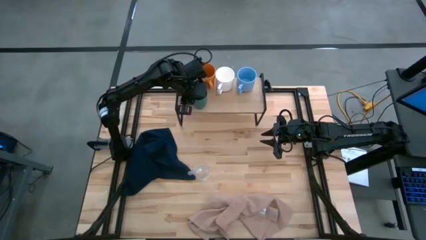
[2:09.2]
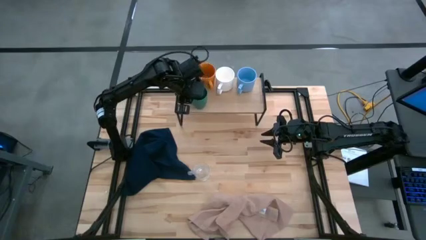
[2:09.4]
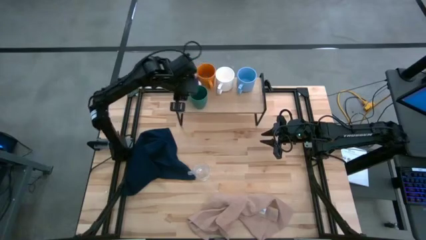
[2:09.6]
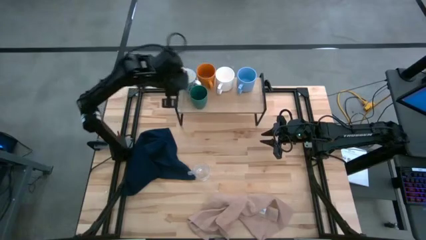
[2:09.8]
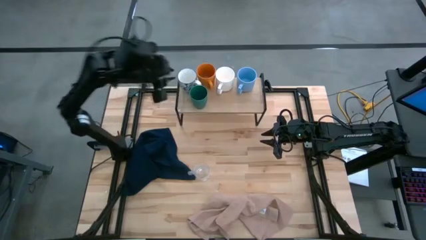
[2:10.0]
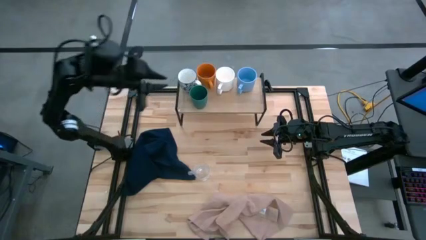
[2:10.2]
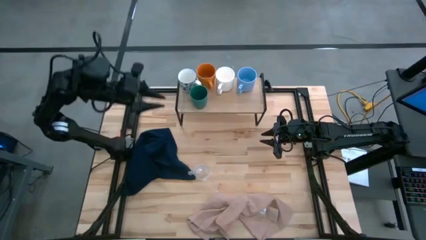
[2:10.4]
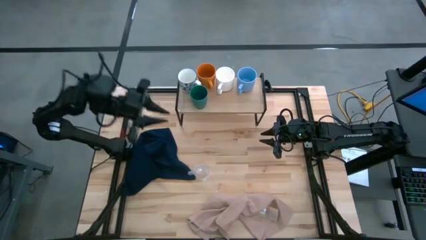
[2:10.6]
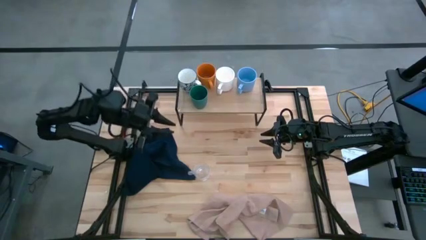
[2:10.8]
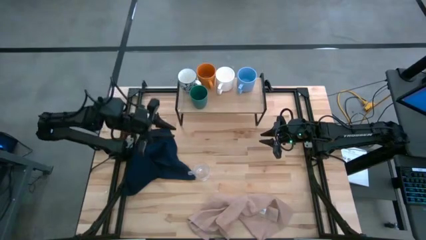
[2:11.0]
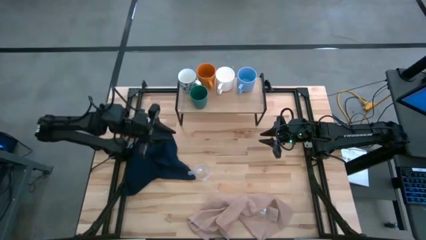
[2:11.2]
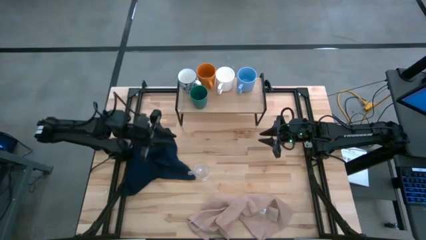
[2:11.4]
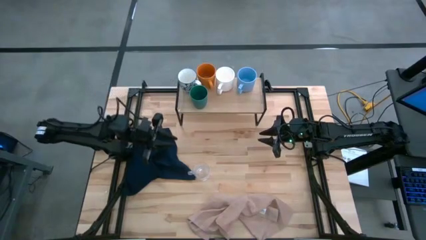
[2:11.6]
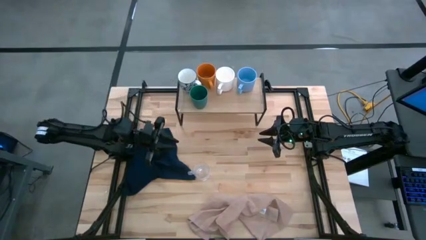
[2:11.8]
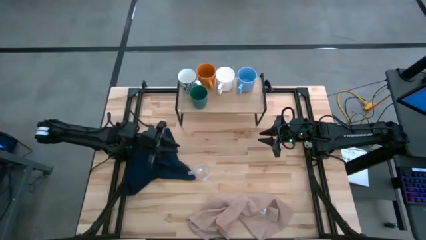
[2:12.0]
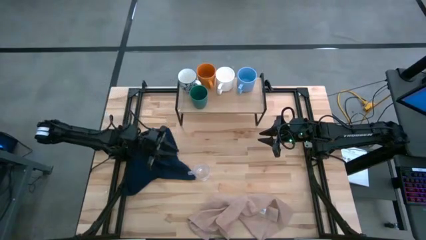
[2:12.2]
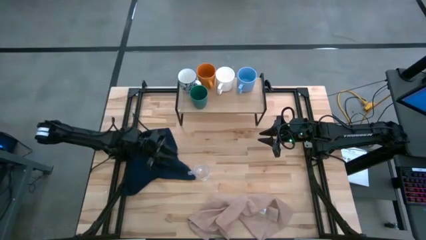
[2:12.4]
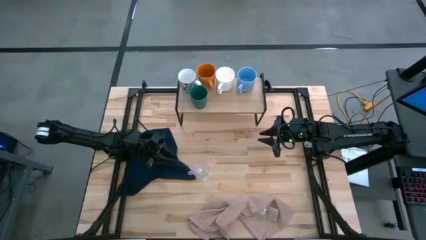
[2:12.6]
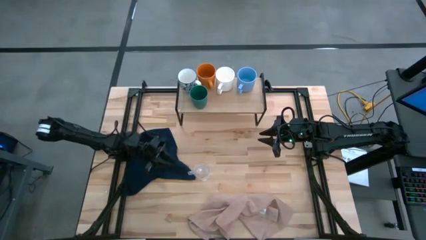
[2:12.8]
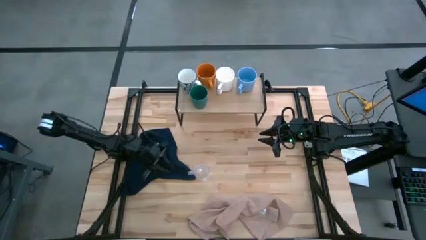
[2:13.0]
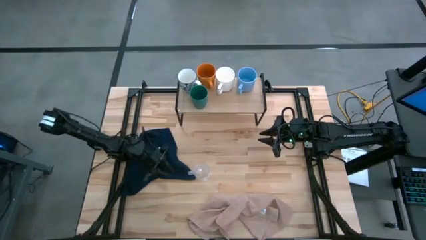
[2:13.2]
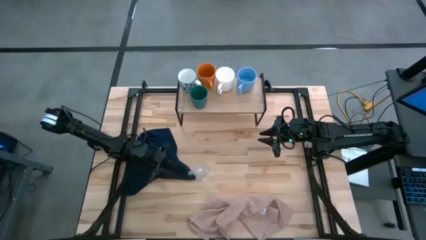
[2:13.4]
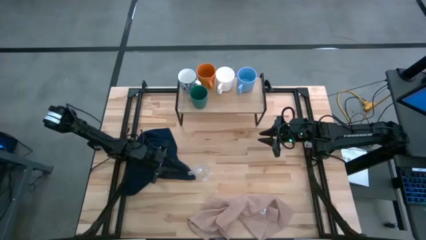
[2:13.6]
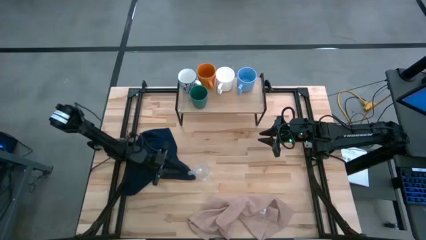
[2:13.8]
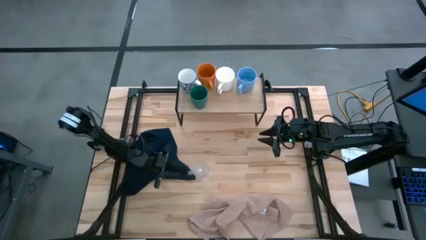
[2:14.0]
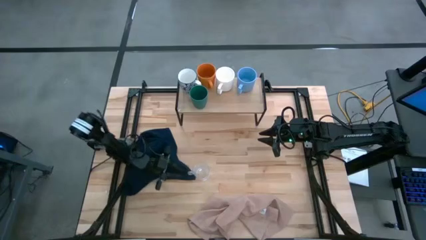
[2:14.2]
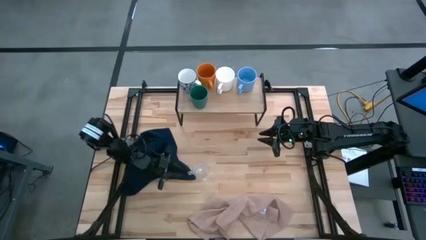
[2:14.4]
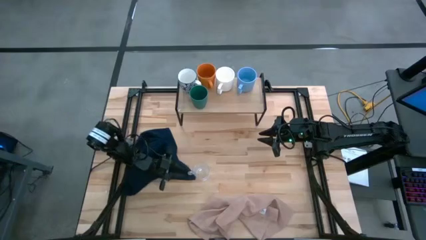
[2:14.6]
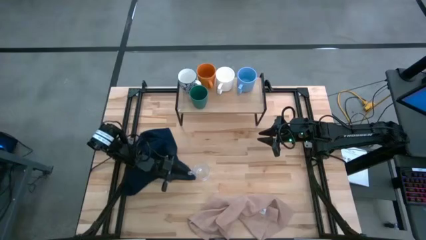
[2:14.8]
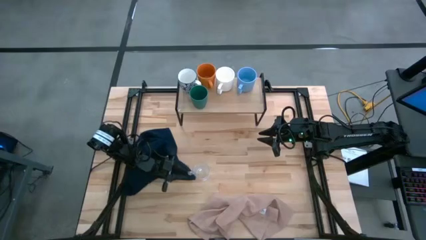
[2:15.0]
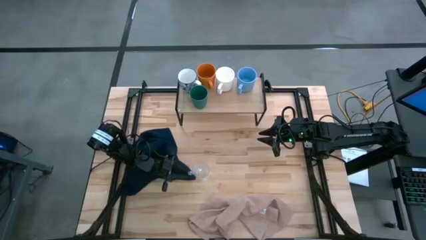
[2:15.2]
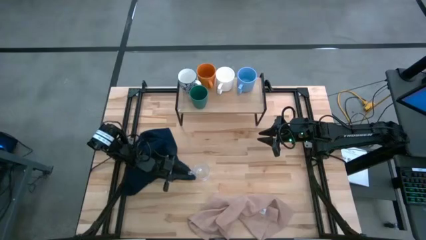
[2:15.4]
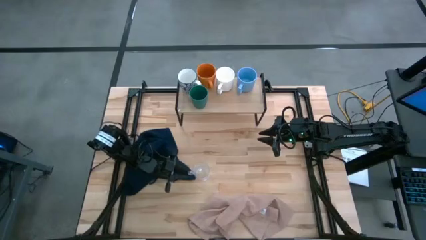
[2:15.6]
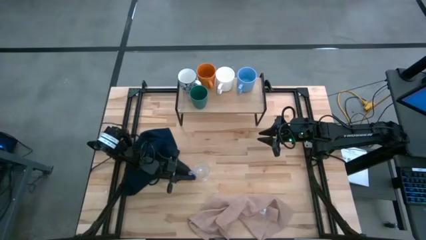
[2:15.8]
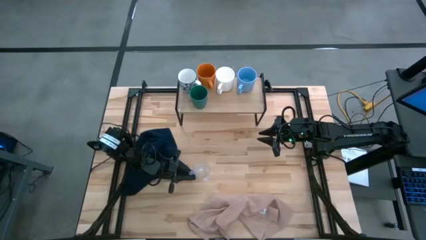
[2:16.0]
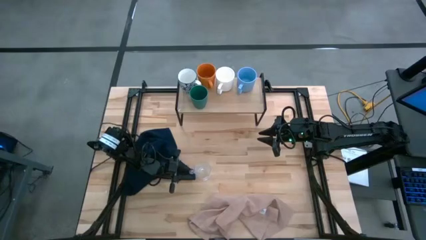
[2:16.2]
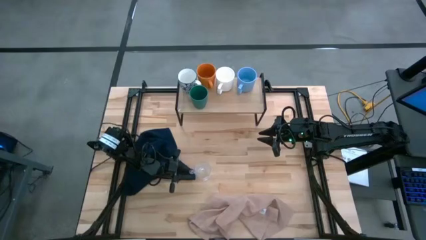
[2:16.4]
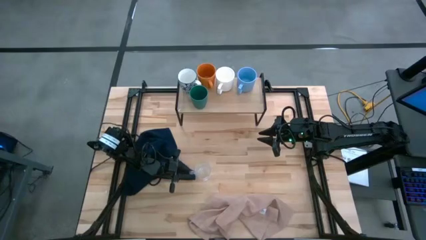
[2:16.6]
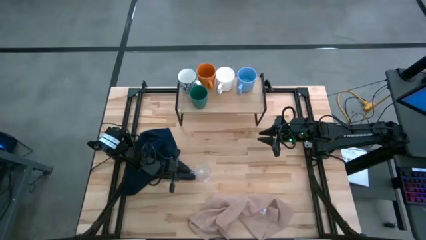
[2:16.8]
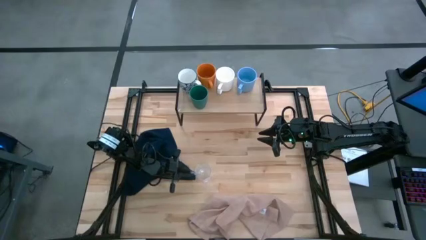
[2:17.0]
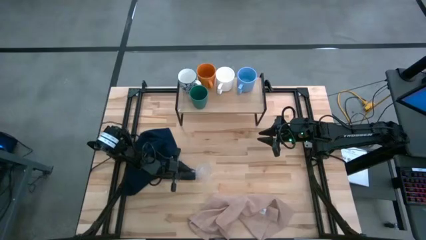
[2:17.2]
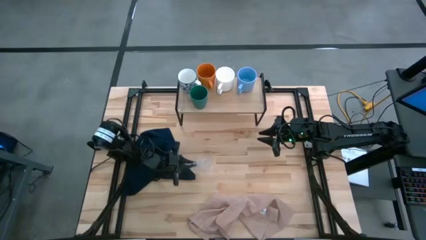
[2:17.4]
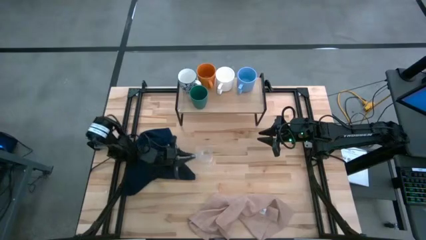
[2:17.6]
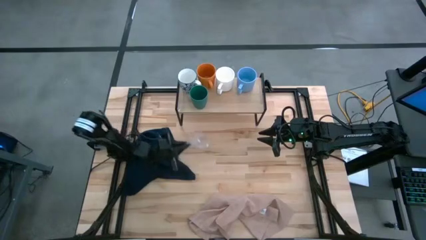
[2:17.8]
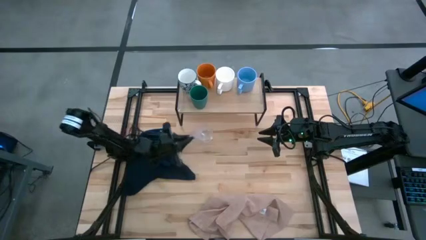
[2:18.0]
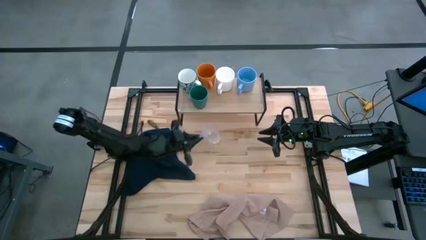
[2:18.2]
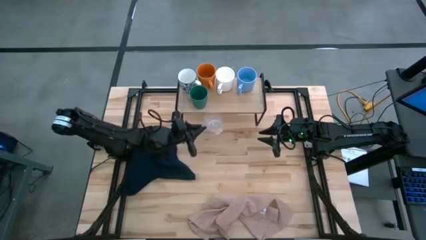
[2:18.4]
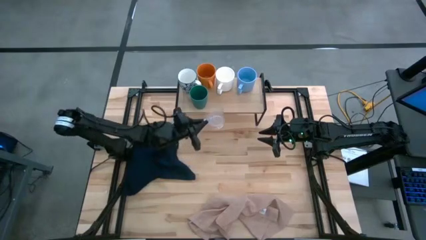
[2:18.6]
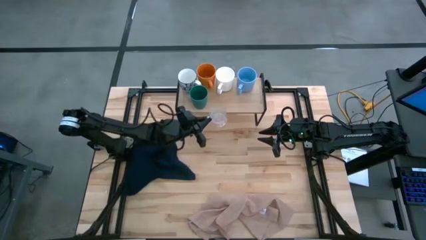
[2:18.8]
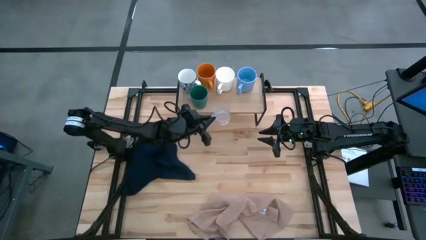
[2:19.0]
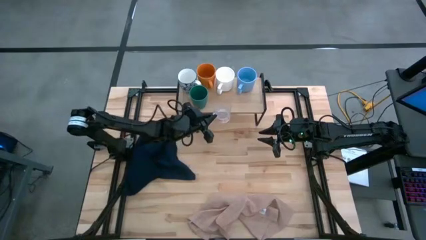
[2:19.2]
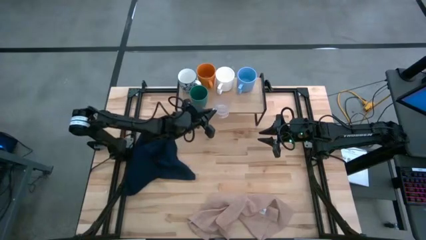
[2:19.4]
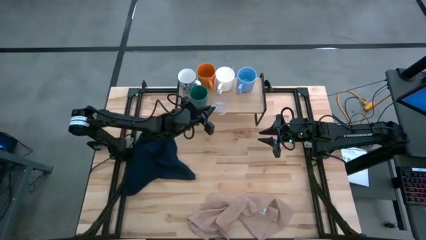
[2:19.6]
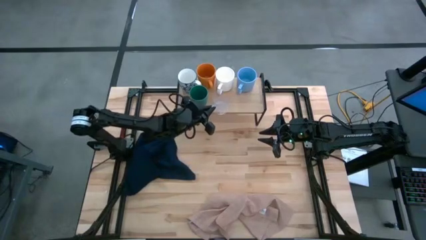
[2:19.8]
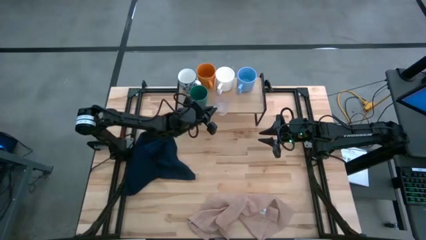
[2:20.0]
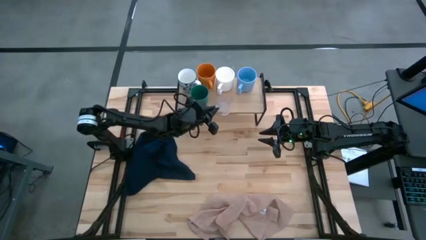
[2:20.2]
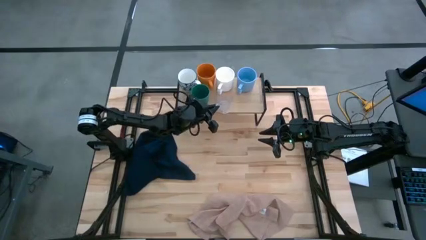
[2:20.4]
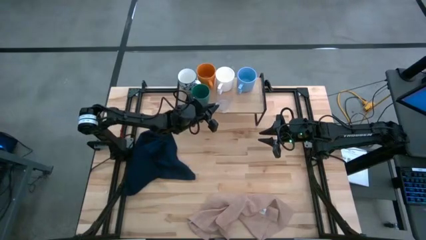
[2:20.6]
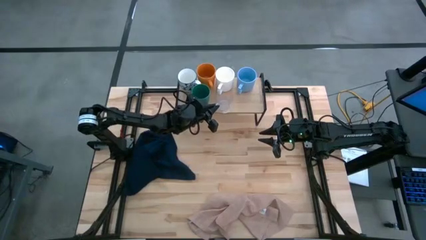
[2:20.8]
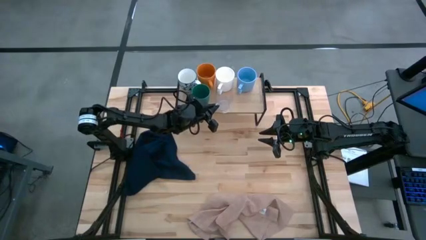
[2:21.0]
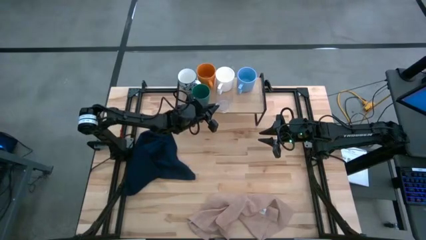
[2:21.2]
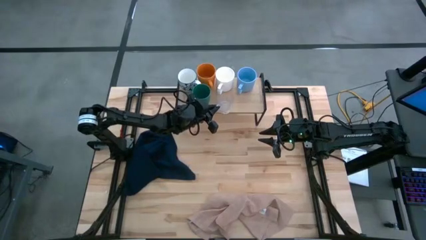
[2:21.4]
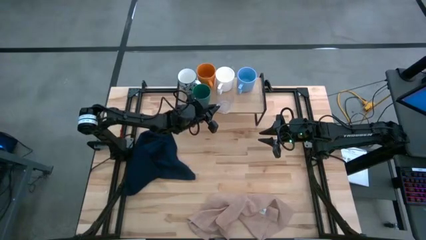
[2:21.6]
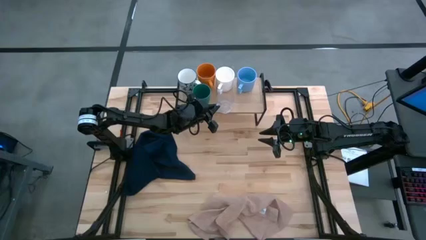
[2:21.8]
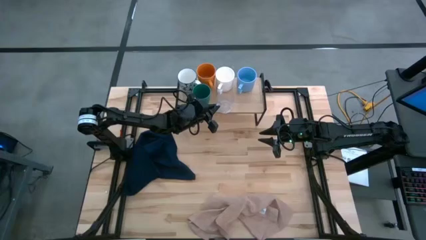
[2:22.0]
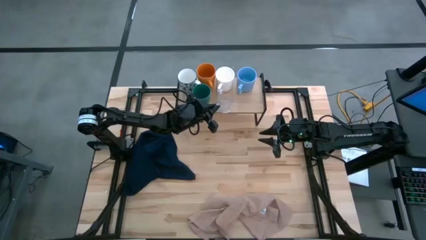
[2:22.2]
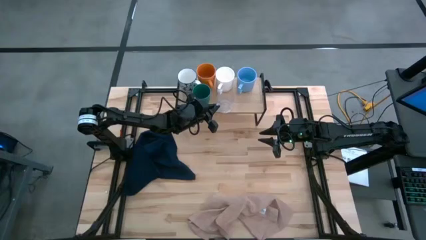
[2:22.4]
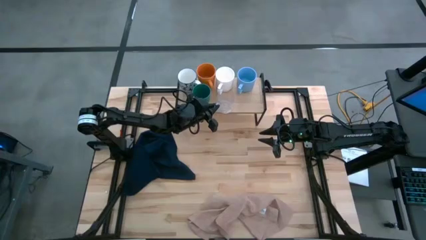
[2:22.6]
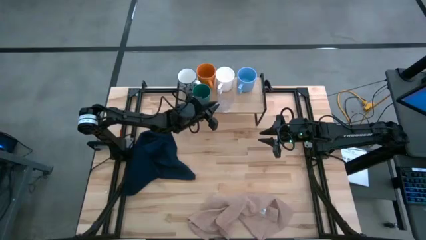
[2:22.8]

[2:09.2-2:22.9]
Task: Stack small to large cups/mugs on shelf
Put the transparent mug on the shelf

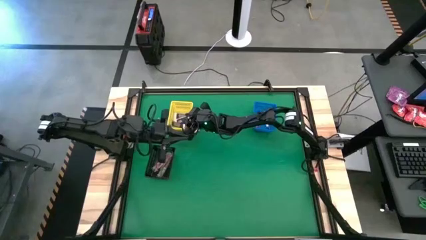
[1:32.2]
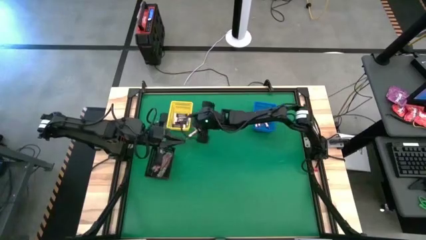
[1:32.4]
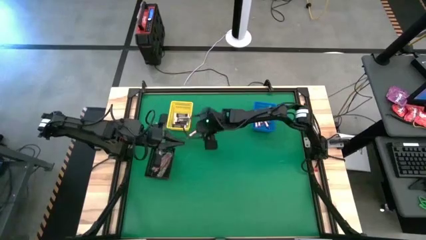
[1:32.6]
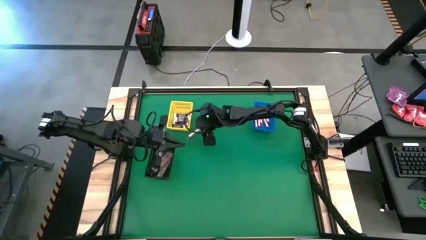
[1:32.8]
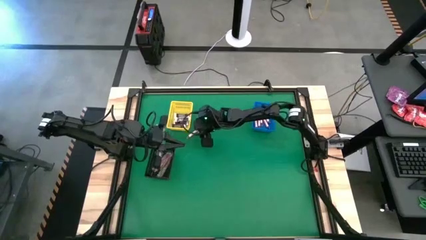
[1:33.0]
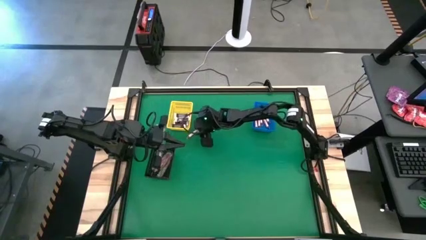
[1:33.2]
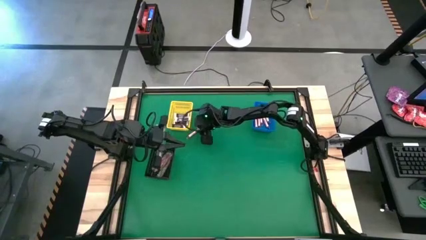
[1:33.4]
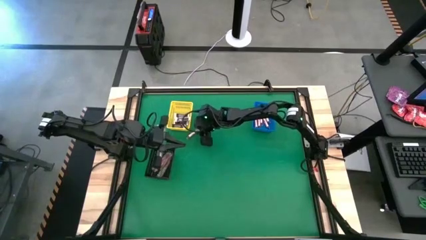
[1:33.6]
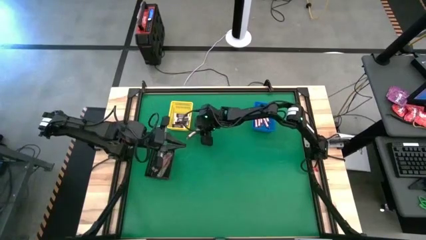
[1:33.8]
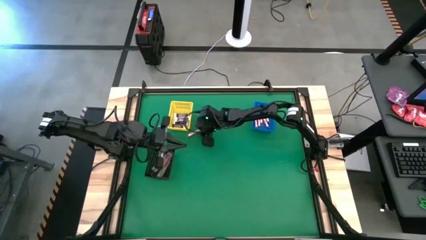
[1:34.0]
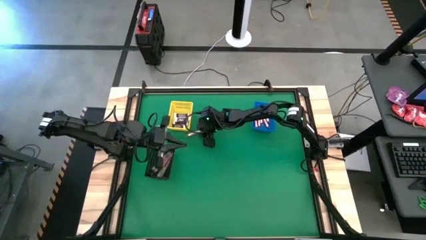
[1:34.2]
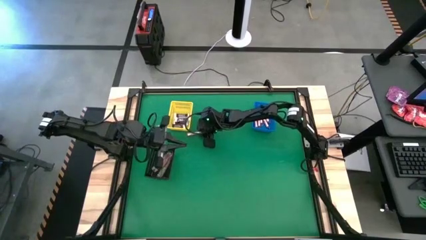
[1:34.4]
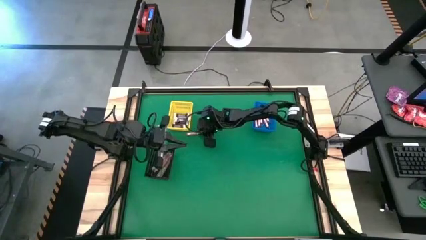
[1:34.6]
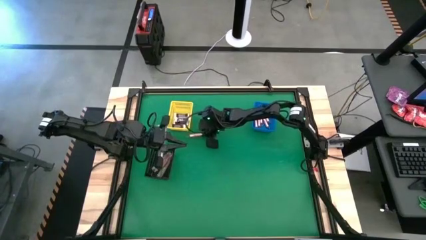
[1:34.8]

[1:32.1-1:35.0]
Task: Sort candy by brand, put in halloween buckets
Put the white candy stick into the blue bin
